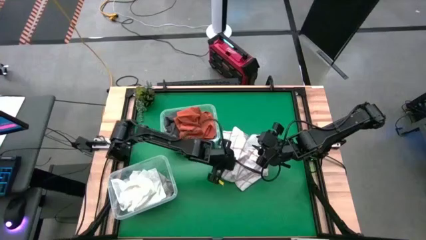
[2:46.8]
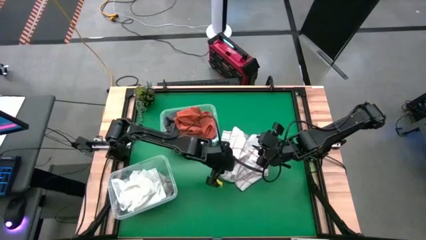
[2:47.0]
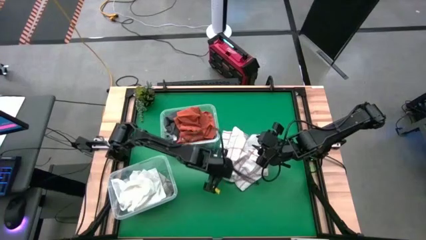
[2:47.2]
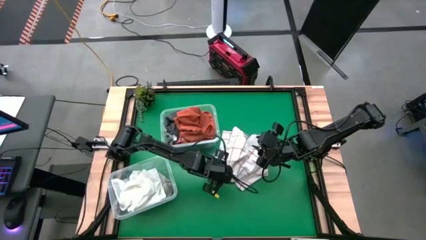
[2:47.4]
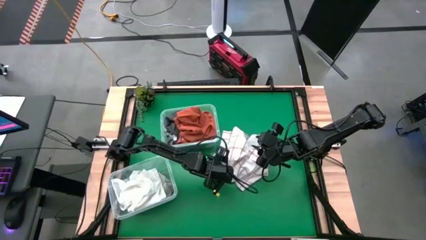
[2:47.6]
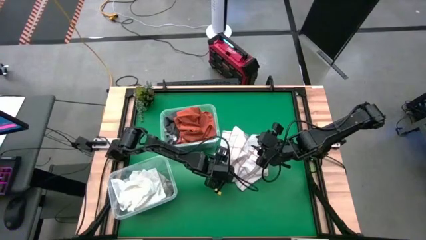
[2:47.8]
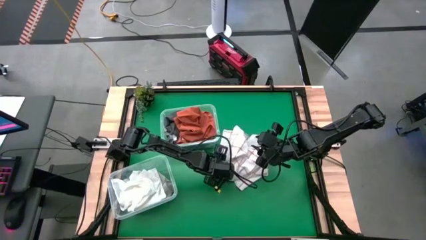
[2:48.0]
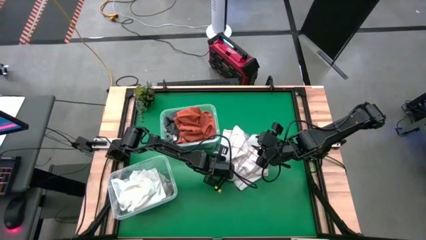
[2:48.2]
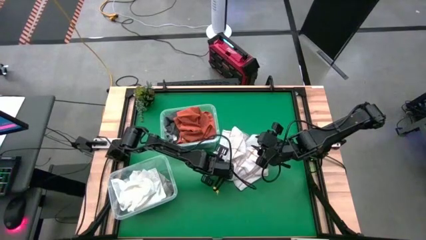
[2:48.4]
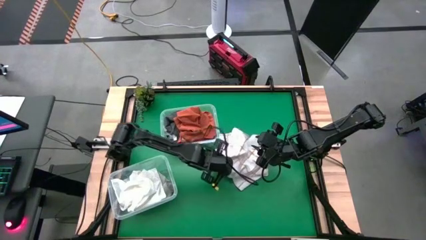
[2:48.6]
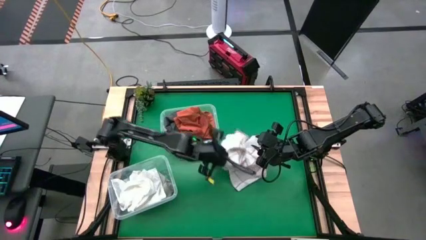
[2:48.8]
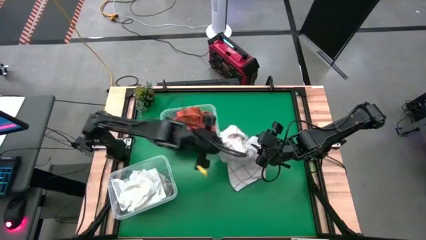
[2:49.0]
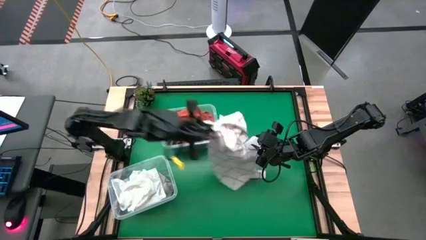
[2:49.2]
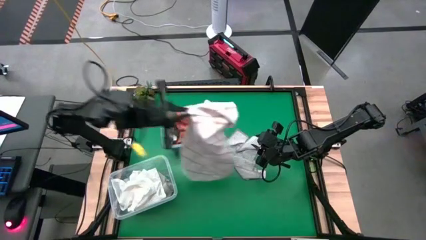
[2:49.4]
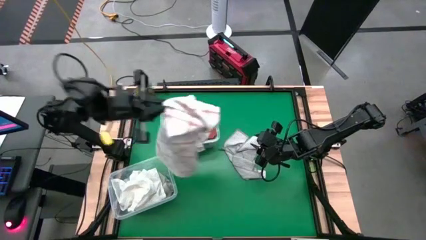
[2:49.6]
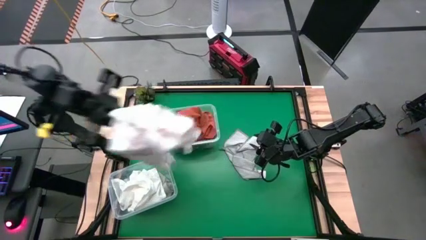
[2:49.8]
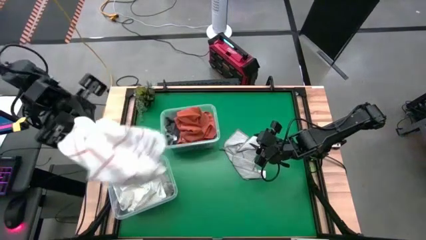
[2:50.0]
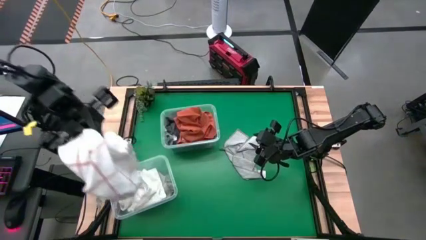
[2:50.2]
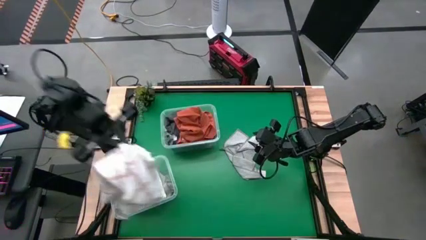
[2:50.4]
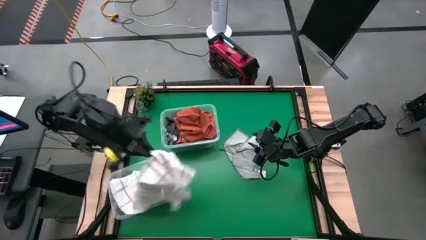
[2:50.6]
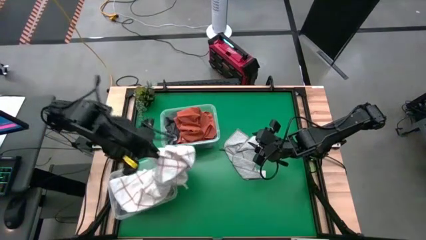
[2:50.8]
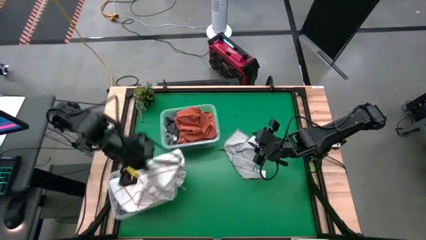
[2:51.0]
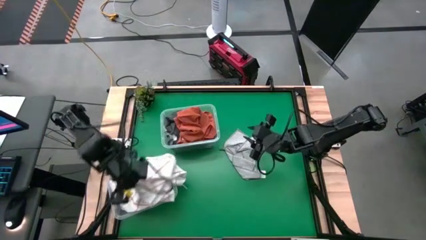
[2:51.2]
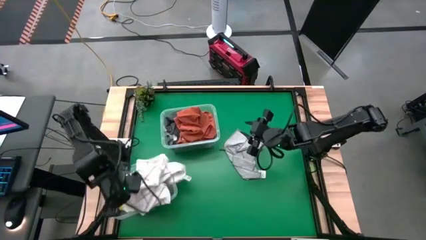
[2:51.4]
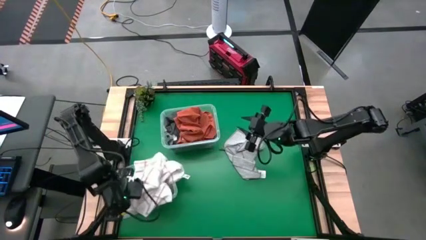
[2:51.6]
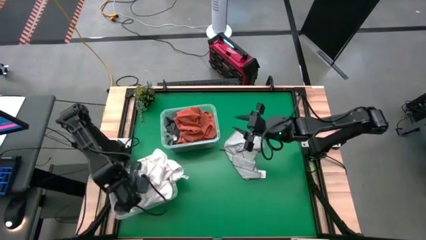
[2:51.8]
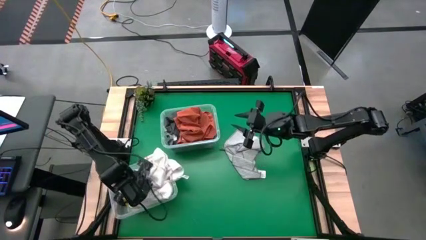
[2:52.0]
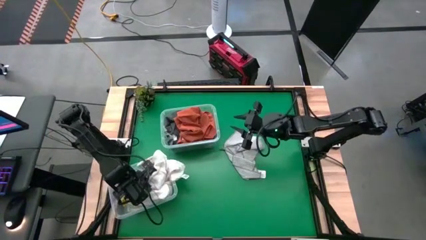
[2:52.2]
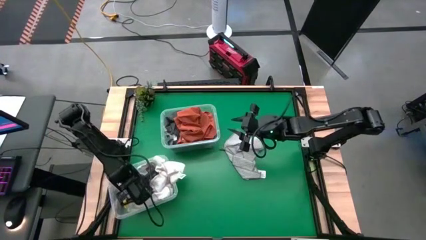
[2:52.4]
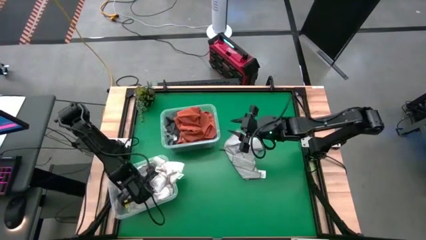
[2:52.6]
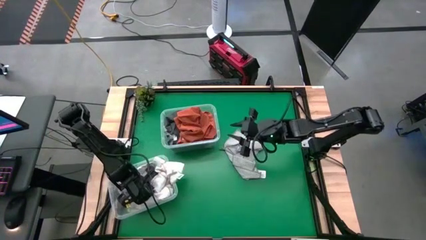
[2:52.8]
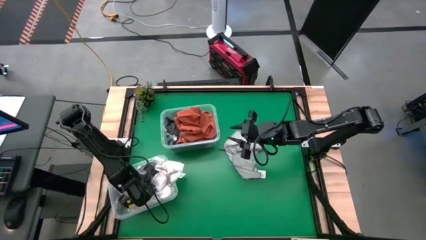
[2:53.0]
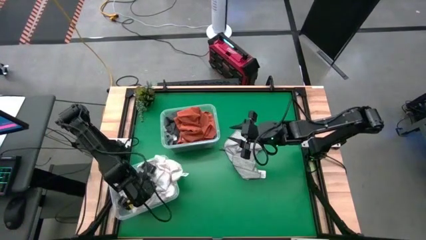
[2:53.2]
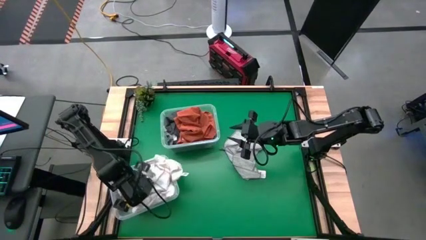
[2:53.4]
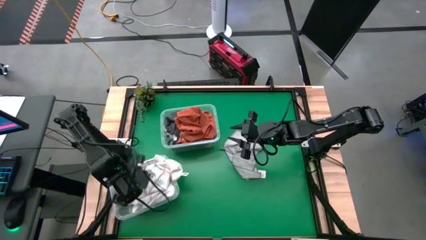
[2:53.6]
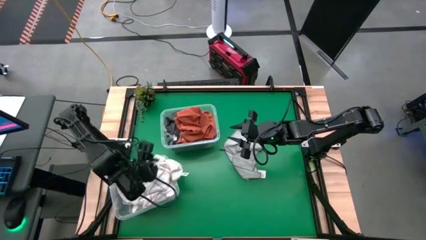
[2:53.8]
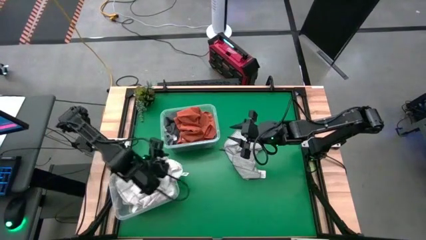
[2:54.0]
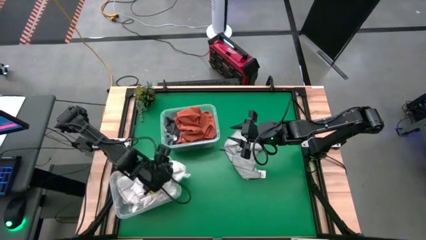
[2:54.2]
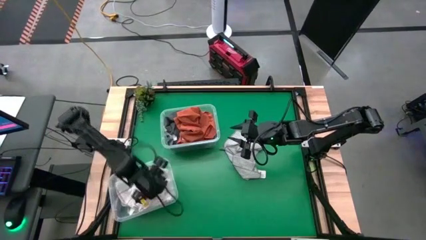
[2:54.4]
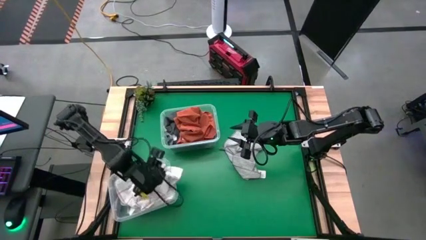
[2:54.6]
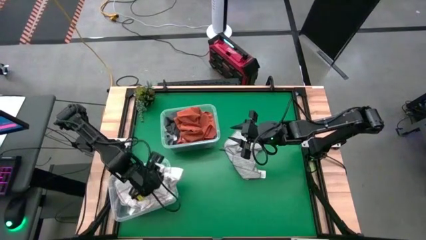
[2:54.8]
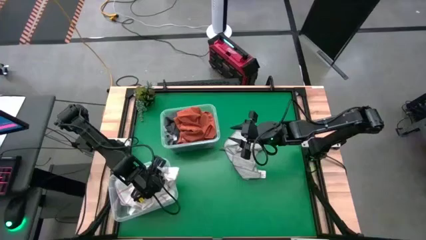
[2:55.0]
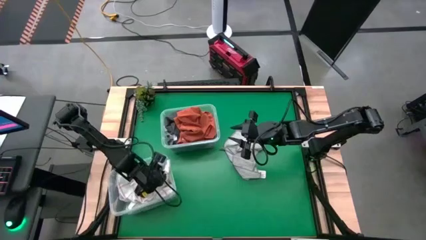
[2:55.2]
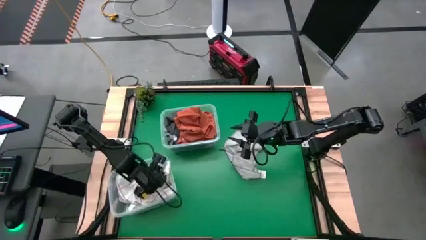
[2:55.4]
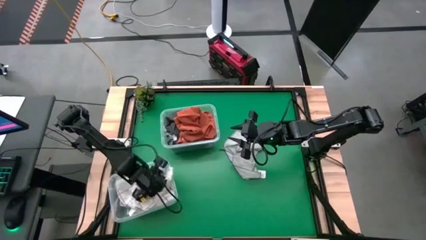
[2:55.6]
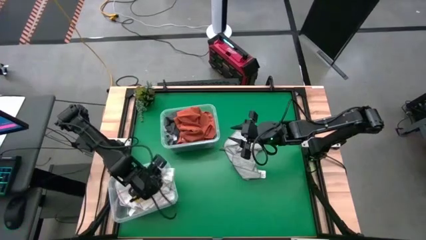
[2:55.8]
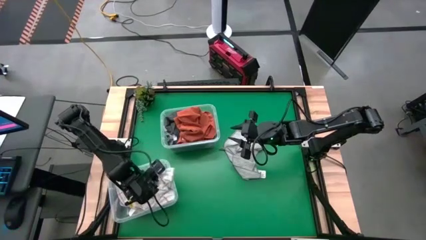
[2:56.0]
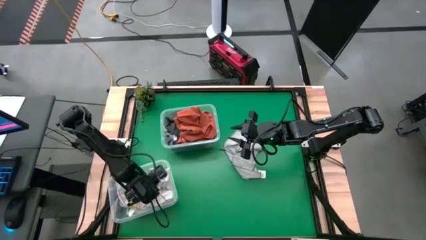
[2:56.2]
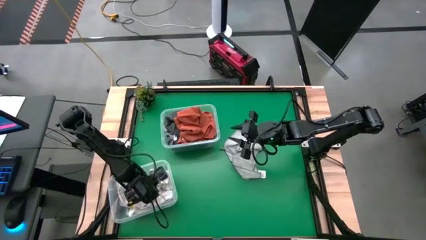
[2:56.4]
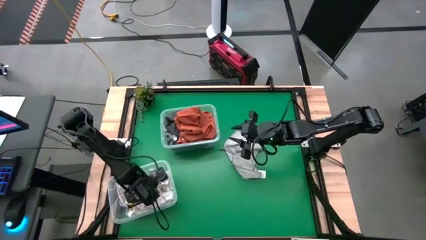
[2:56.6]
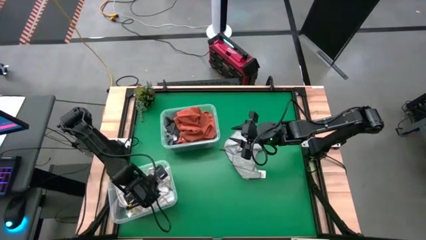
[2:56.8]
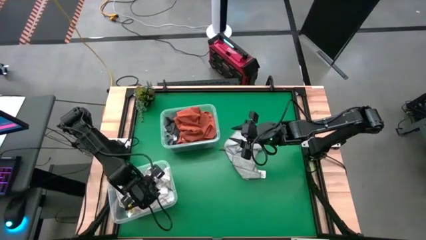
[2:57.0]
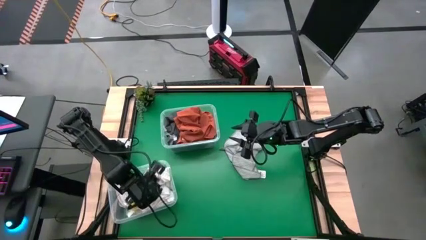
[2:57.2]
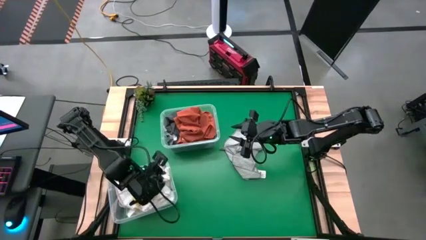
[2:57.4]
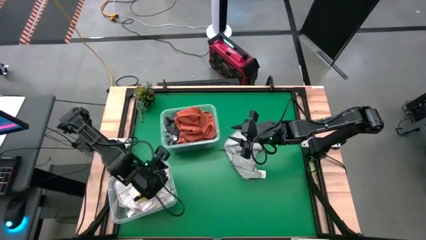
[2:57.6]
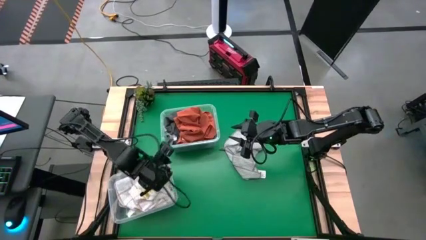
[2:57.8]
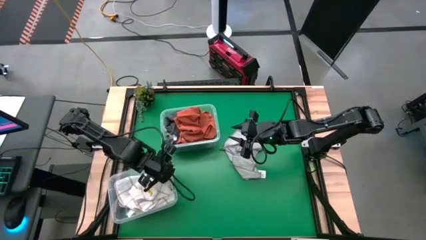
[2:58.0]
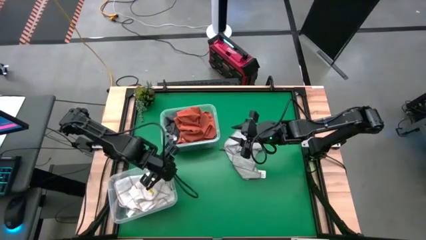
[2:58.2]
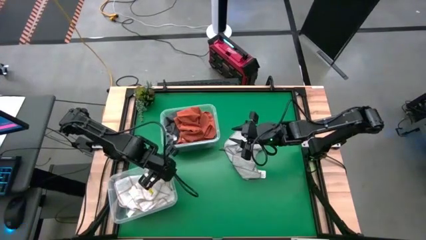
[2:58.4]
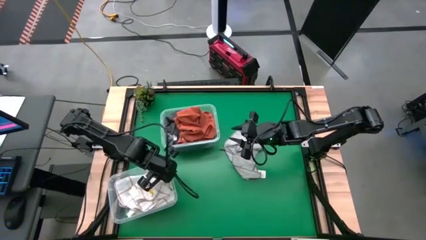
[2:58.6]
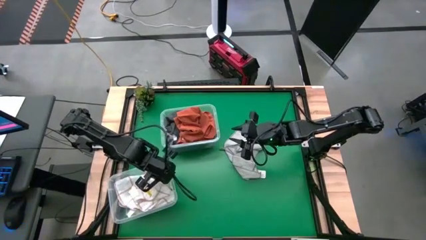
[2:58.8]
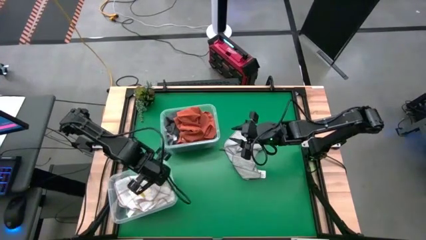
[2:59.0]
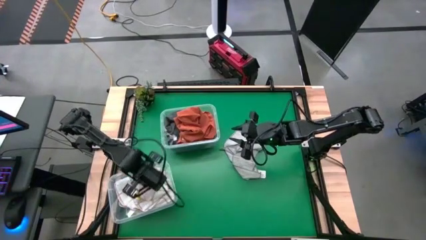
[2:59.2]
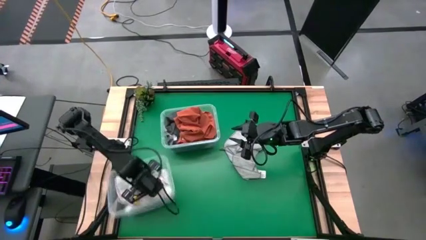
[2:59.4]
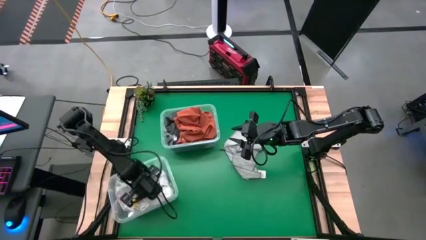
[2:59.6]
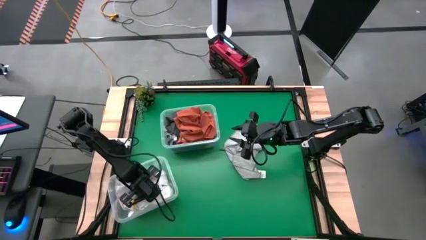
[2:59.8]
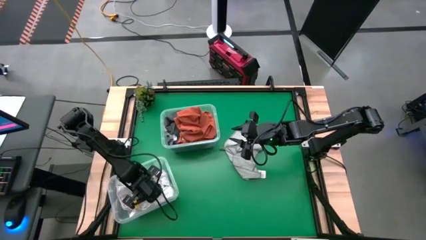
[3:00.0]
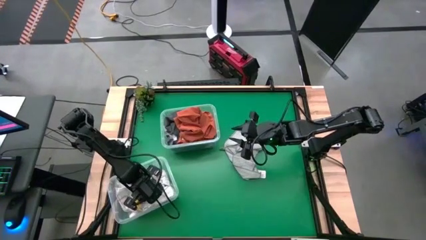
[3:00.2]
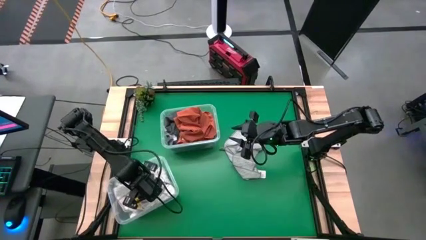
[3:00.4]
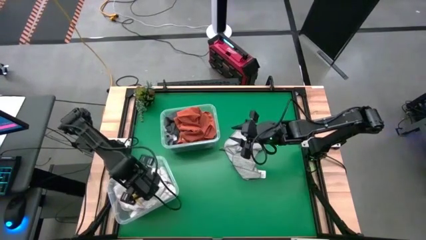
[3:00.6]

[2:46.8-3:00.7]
Task: Sort towels by color in basket
Put the white patterned towel into the bottom transparent bin

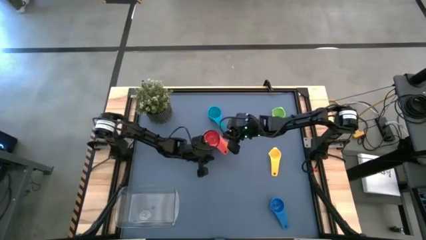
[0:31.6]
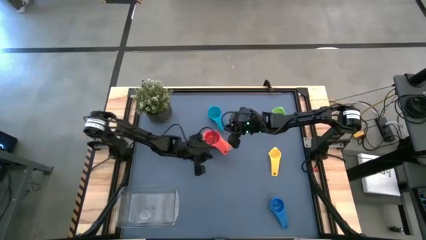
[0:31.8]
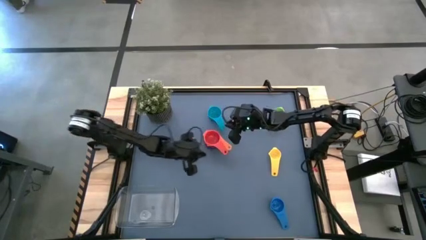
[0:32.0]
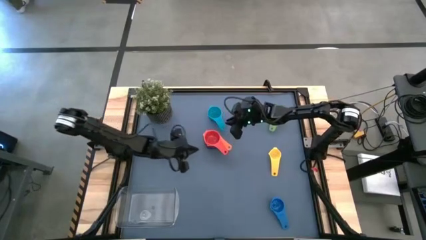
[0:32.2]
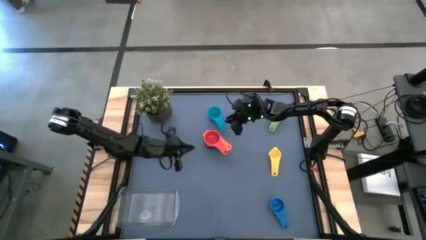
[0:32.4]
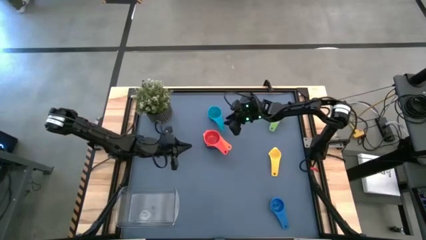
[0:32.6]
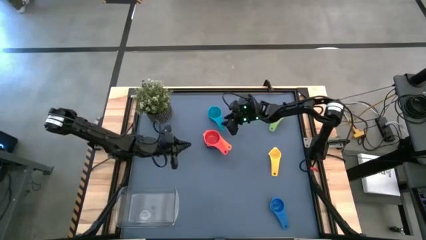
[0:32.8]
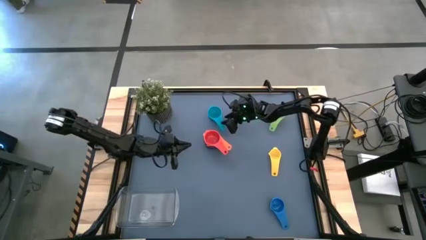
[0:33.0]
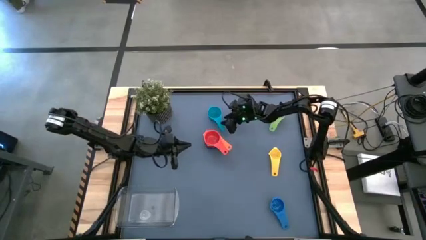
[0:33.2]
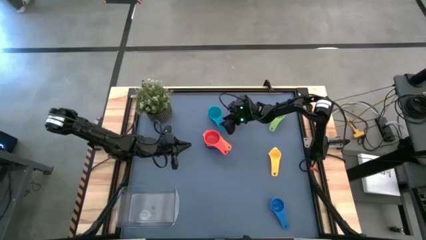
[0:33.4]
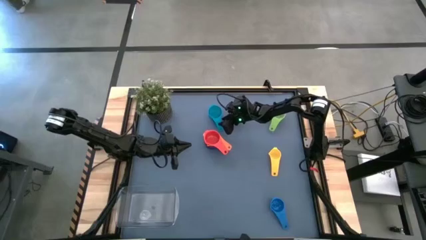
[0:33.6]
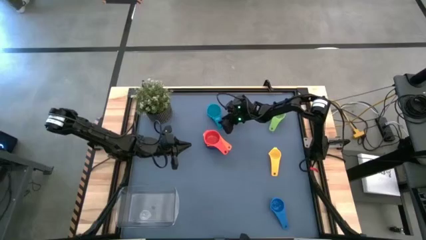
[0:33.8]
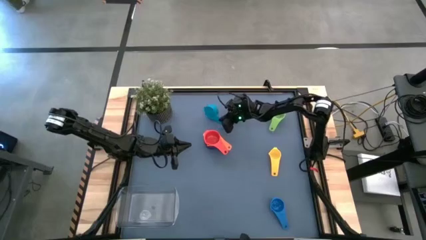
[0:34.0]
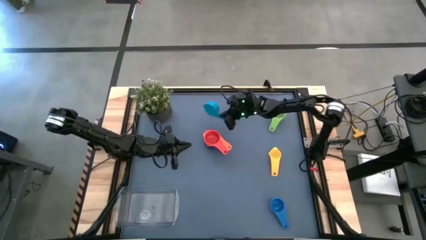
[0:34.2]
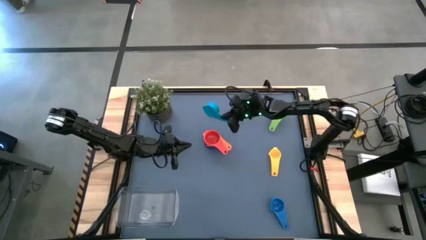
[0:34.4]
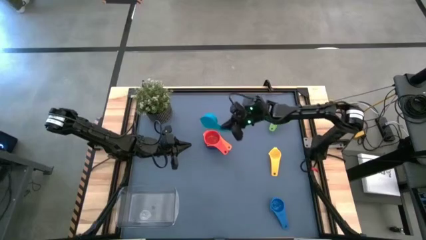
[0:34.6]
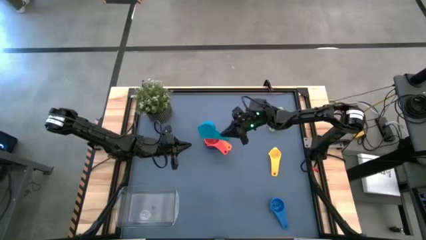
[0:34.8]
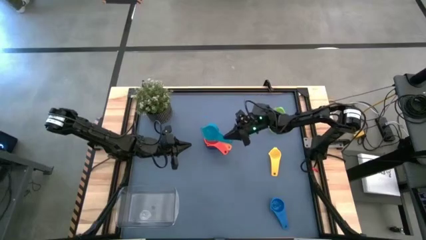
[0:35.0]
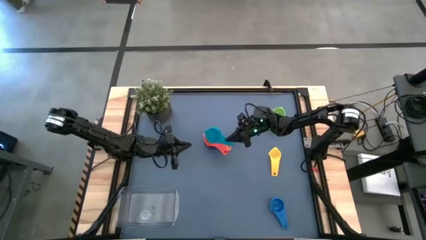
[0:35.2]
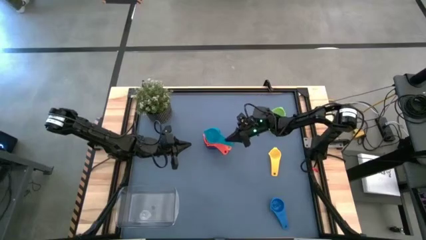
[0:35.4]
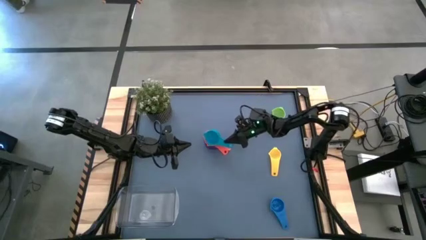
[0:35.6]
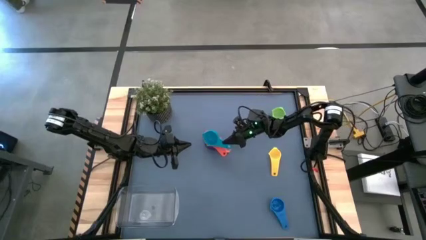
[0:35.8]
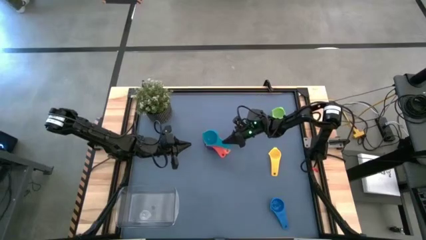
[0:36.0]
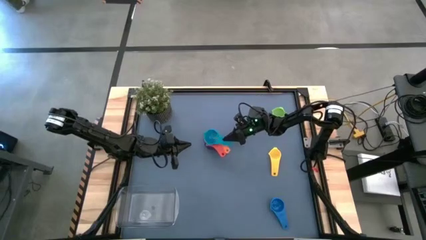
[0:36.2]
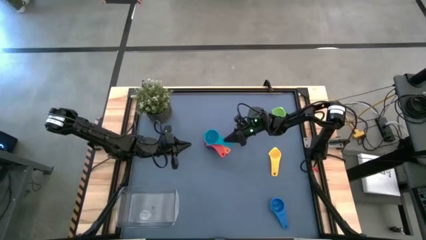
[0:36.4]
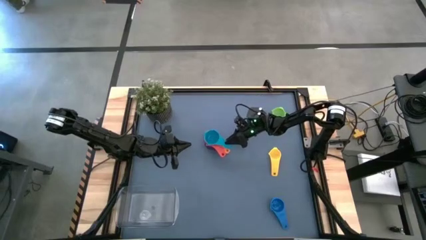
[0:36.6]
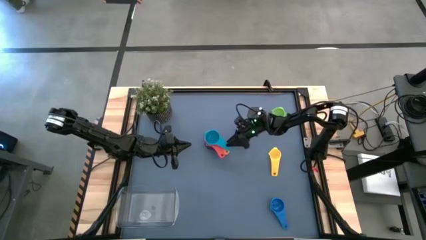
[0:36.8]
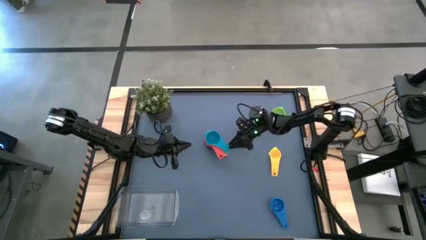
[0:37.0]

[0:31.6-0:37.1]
Task: Nest measuring cups in basket
Stack the light blue measuring cup on top of the orange measuring cup
